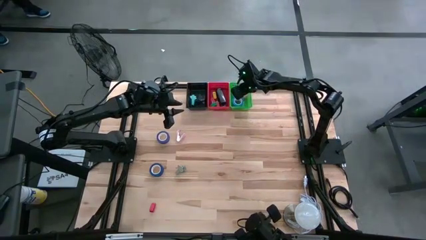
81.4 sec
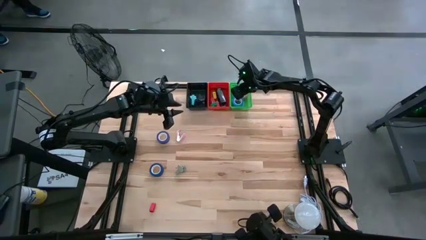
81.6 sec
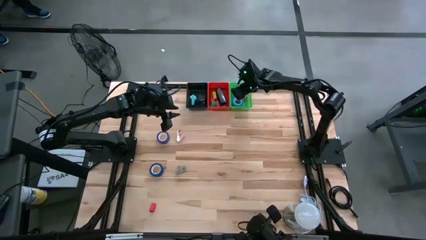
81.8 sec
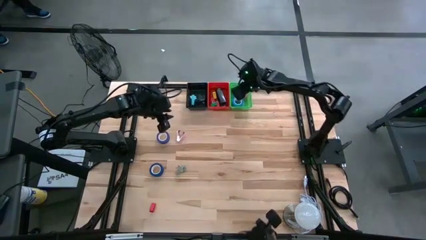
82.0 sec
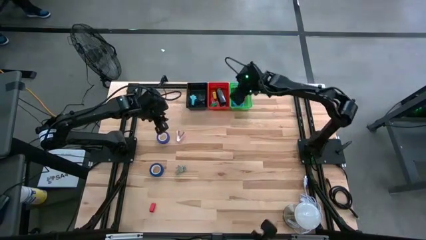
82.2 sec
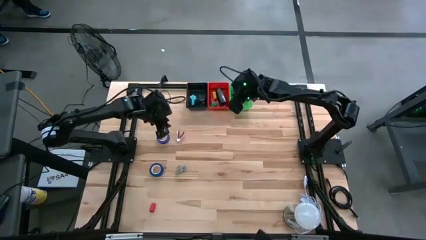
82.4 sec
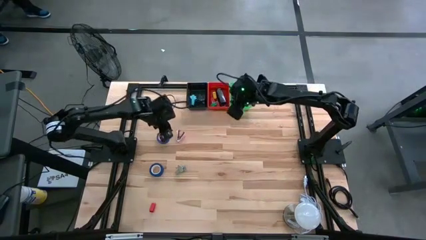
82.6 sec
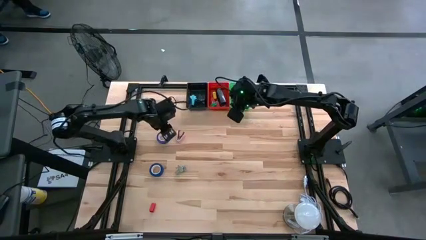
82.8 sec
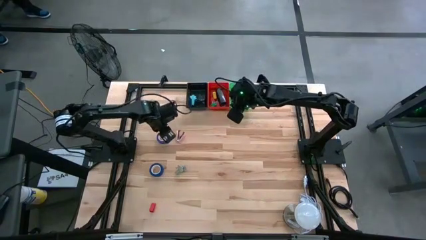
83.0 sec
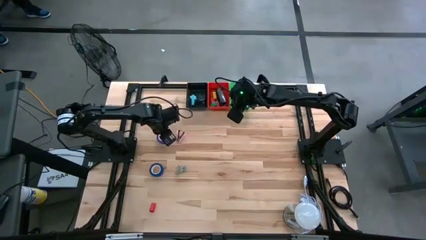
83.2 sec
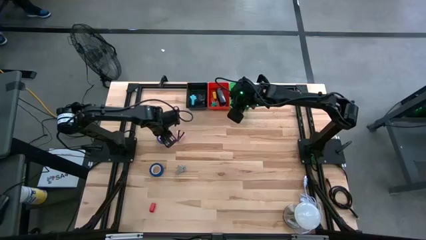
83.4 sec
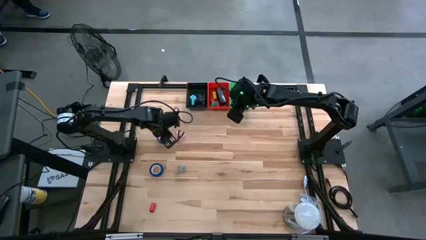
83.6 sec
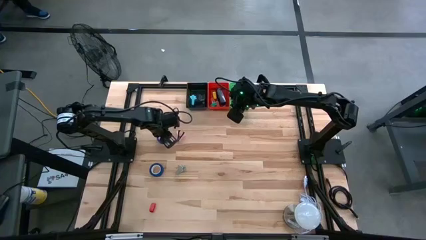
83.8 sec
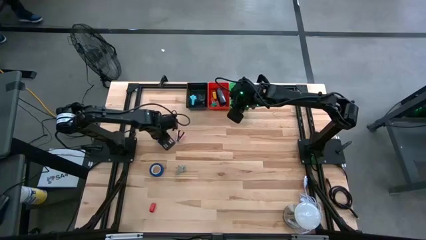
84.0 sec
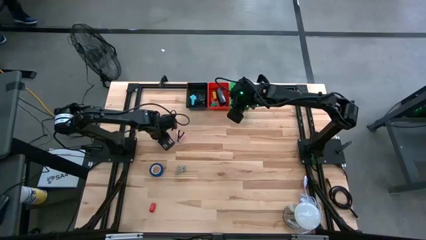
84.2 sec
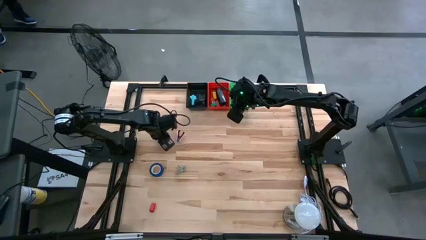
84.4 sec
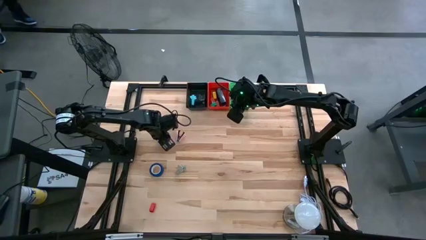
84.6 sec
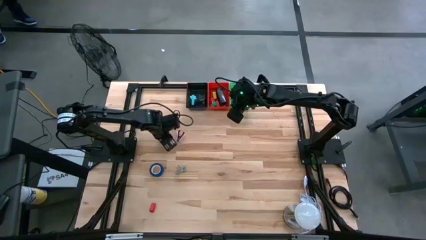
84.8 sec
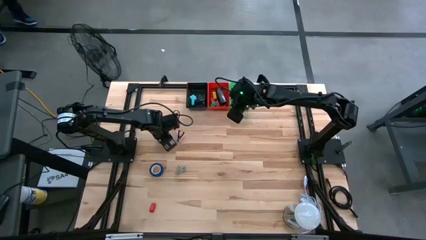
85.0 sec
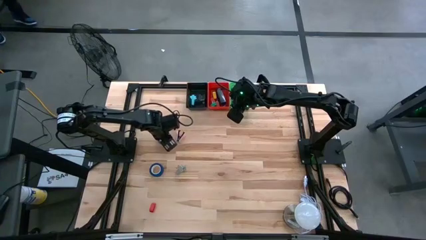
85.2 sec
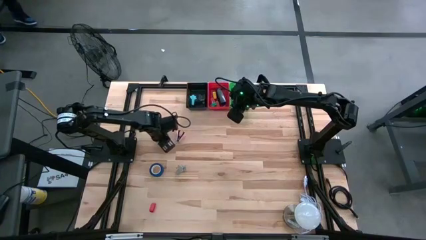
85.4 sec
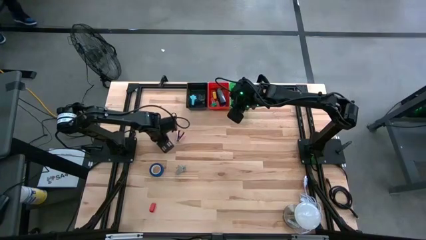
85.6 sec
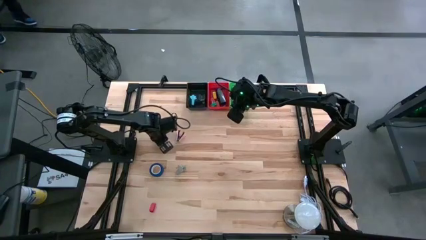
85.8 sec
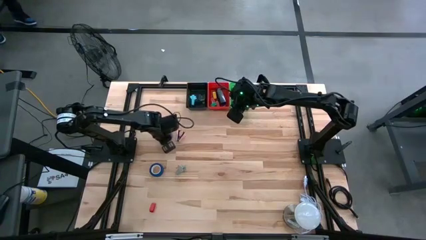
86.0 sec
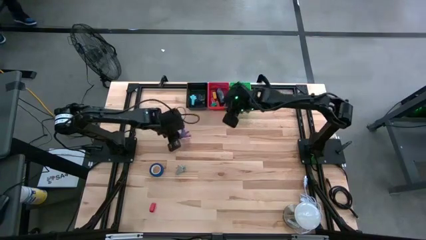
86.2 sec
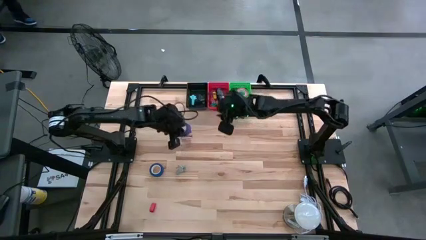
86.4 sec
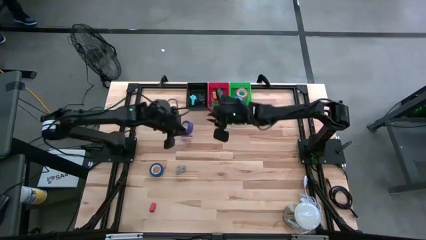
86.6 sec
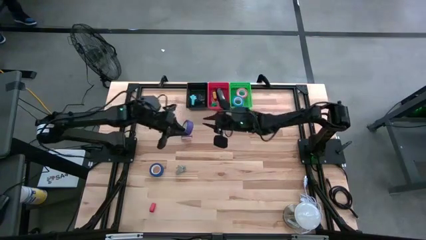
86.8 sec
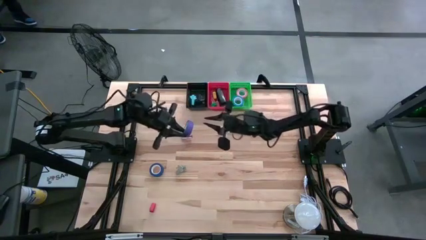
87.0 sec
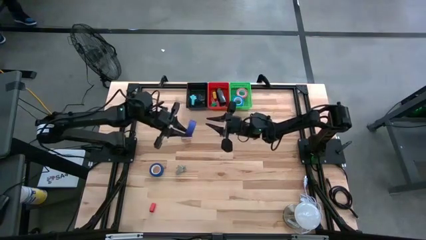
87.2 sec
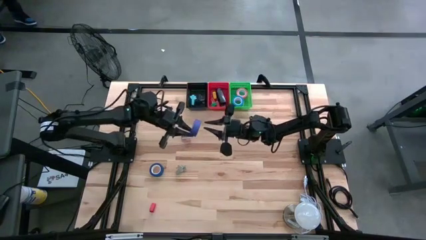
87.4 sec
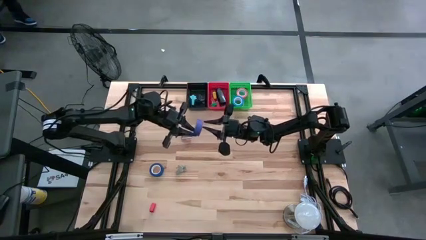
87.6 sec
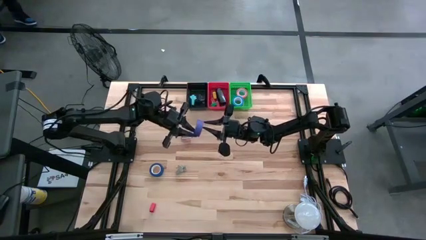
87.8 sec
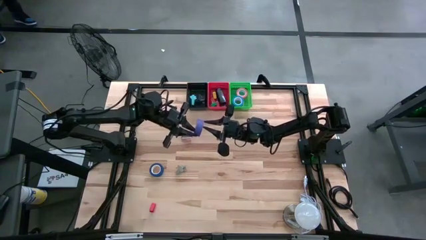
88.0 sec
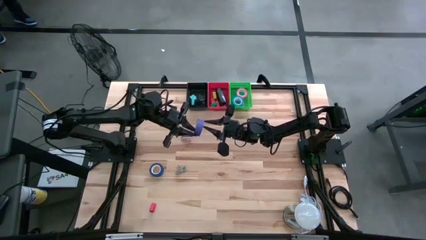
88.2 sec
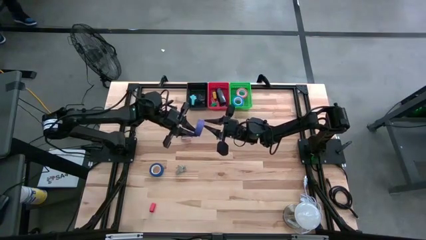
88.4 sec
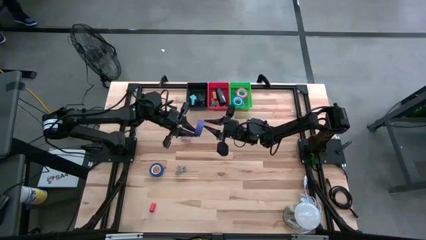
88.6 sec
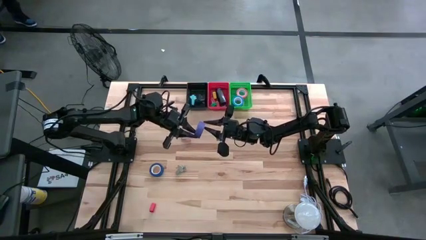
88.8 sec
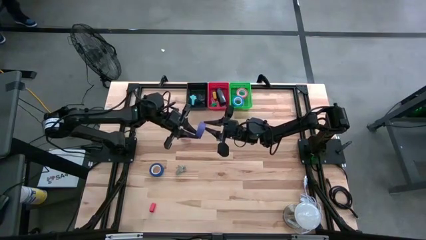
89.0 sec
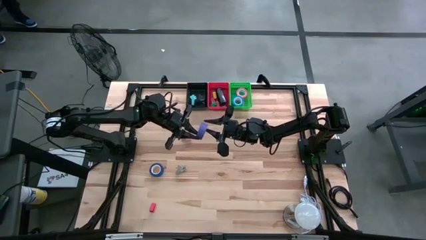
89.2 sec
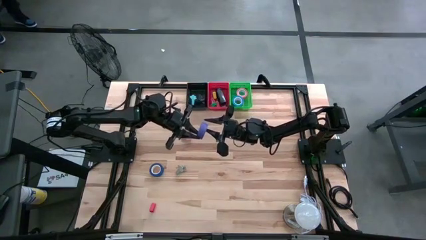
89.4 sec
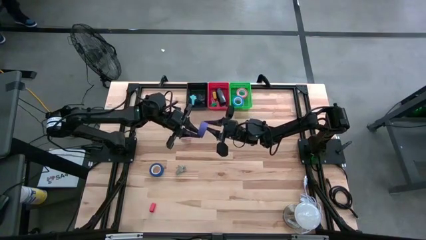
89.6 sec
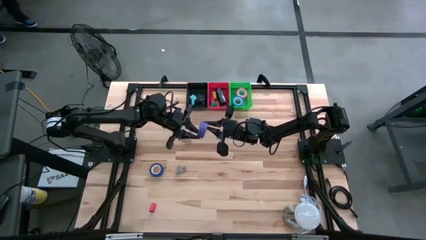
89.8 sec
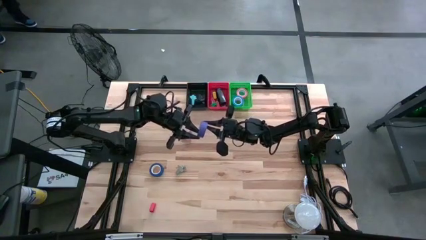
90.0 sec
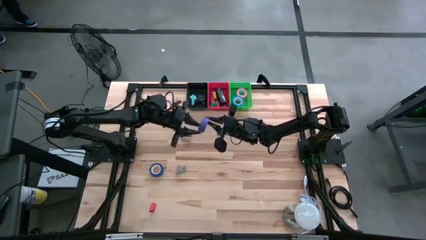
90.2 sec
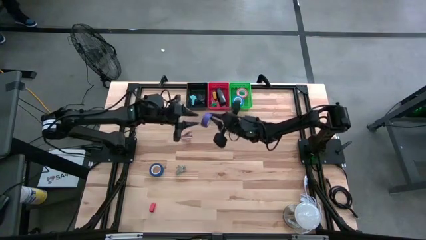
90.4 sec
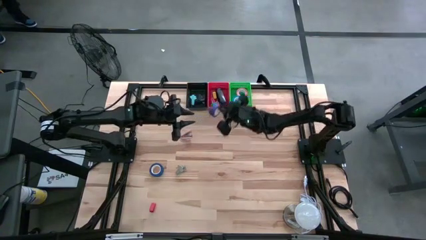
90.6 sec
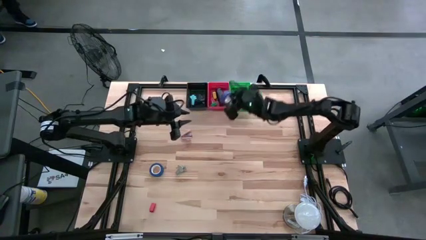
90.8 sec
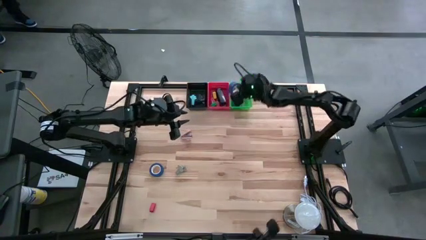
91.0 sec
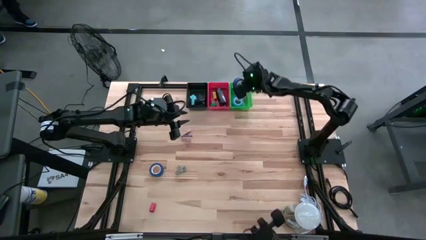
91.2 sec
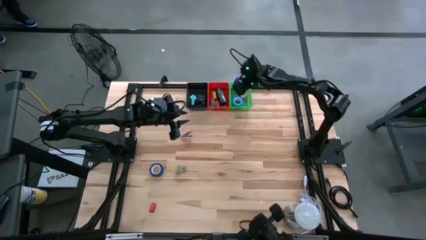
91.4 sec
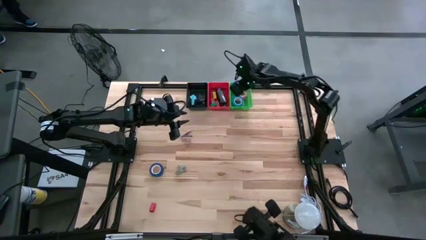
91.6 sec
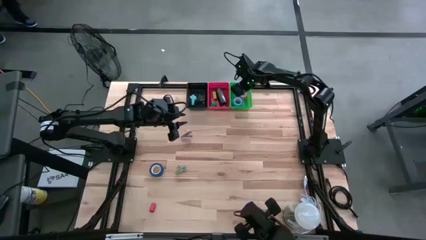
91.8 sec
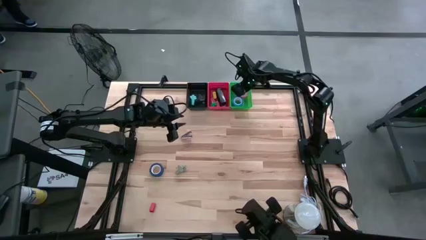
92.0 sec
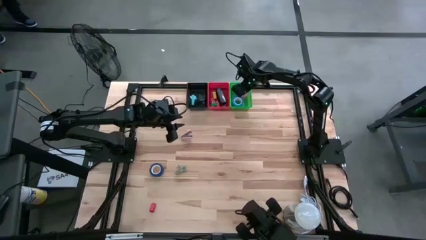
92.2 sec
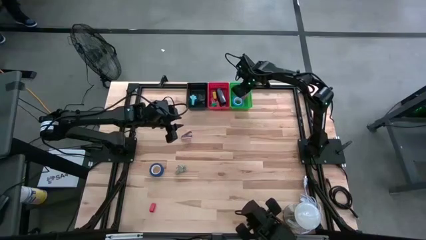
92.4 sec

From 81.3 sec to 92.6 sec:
Task: Pick and place Stapler, Stapler remover, tape
Put the purple tape into the green bin

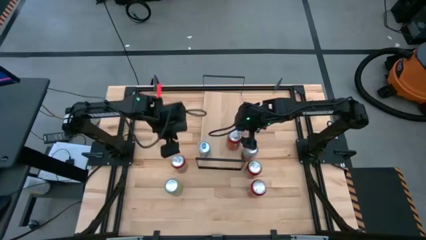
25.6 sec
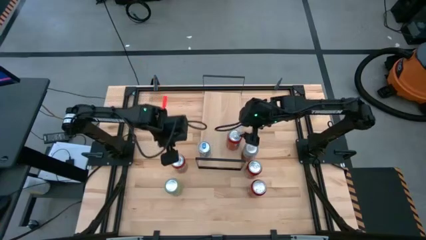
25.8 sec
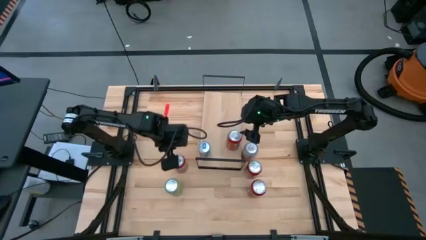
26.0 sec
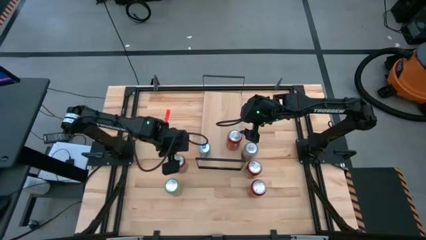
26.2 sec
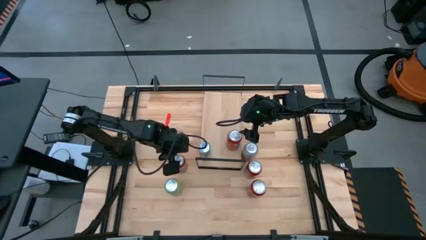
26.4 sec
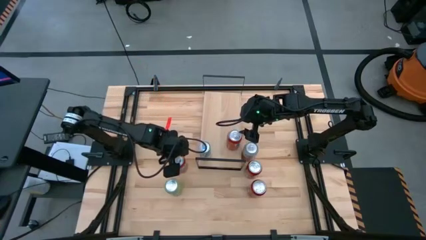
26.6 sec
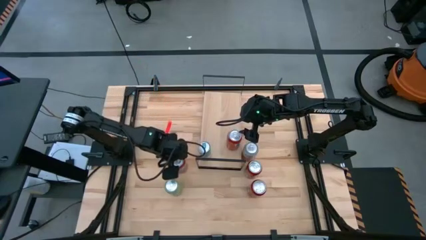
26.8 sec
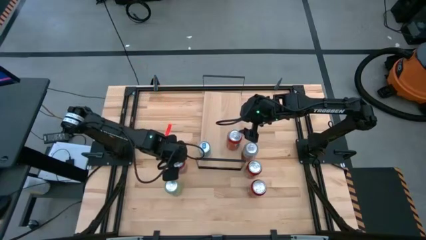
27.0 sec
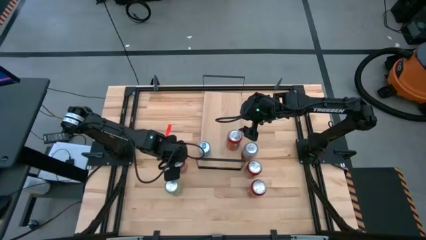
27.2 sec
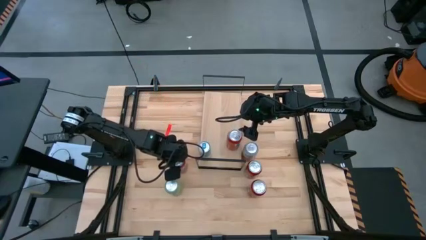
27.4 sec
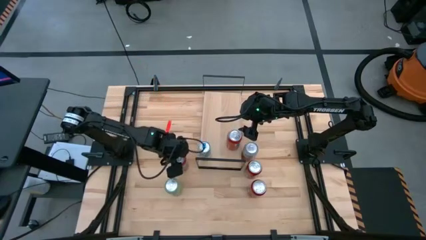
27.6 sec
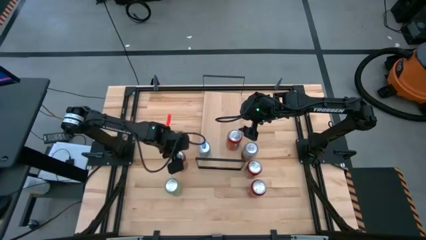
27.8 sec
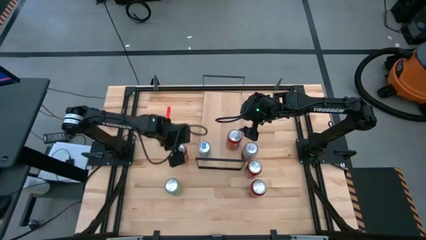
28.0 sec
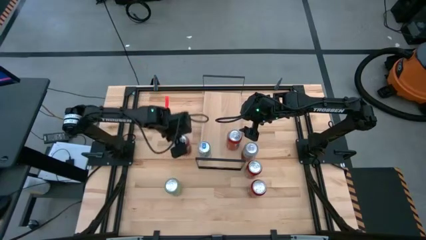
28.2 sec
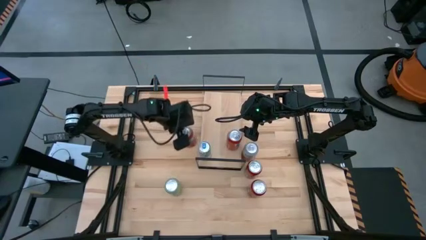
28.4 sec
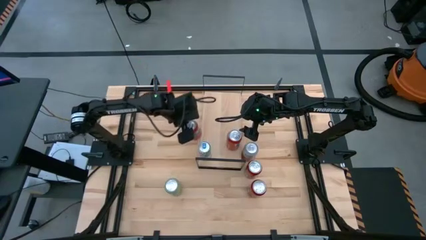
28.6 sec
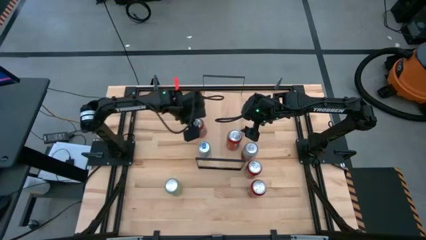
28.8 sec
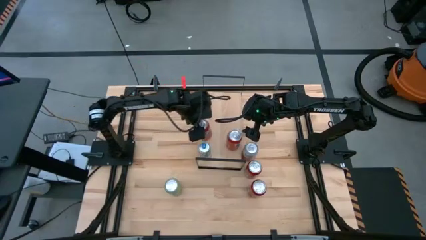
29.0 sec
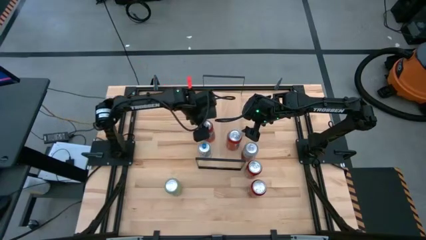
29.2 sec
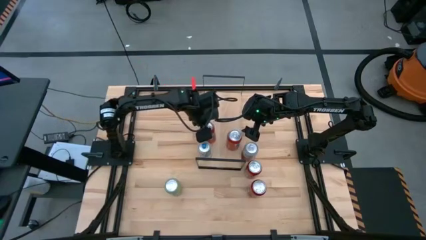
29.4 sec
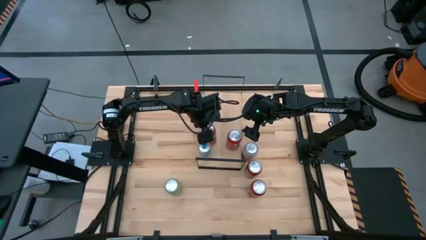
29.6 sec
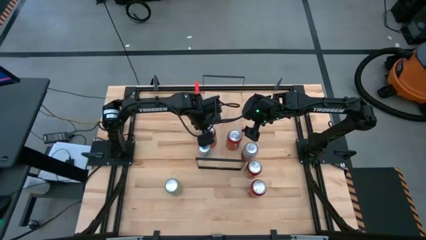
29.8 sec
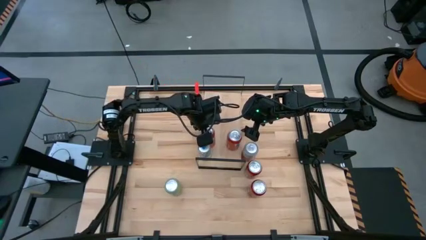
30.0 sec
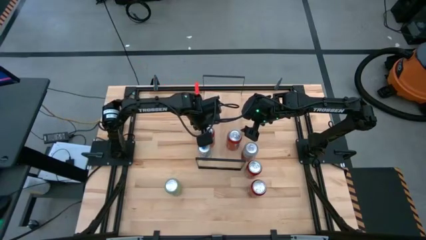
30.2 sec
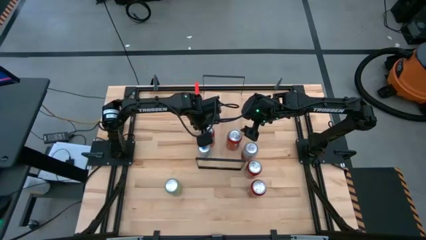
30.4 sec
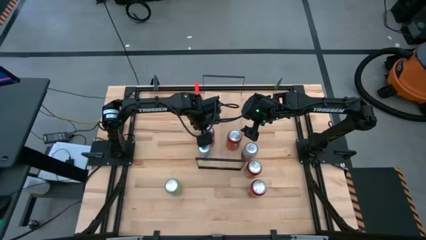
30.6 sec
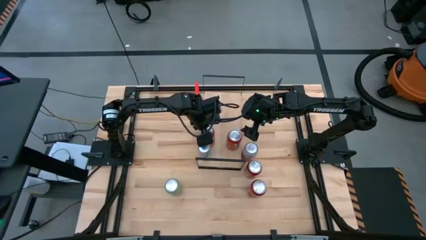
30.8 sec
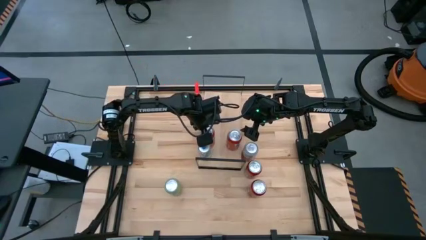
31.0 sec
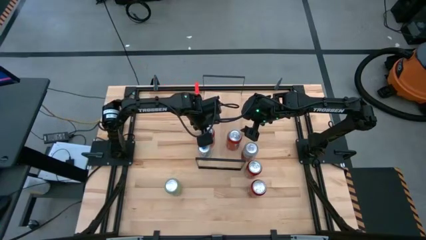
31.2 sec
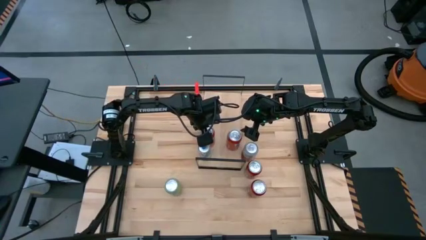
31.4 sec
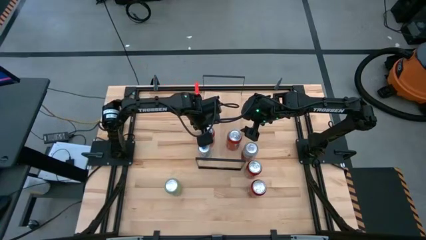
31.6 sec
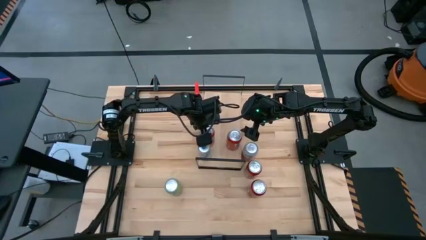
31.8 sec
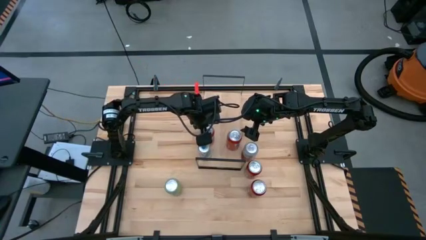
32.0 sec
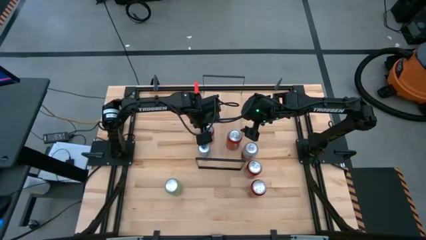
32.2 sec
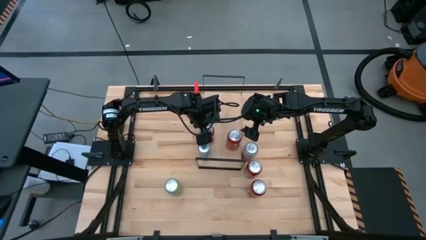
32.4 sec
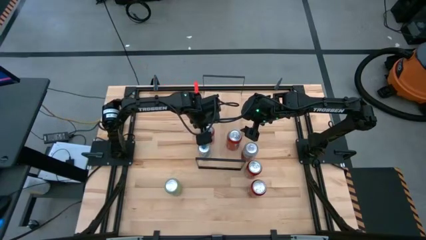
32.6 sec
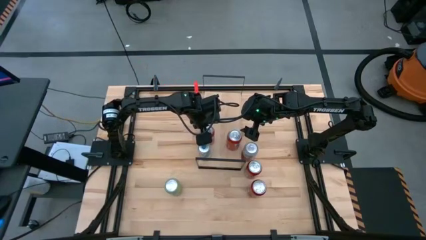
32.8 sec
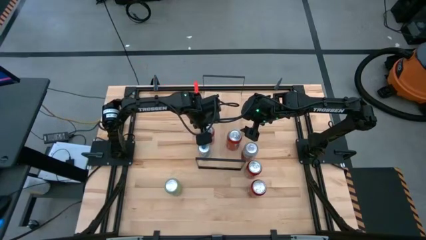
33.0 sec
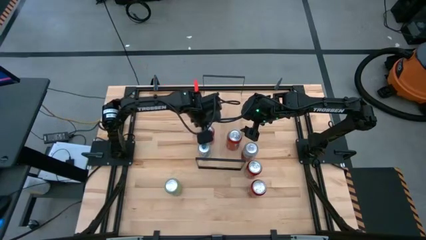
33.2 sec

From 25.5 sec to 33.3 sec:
Task: Place canned beverage on shelf
Put the red soda can on the shelf
